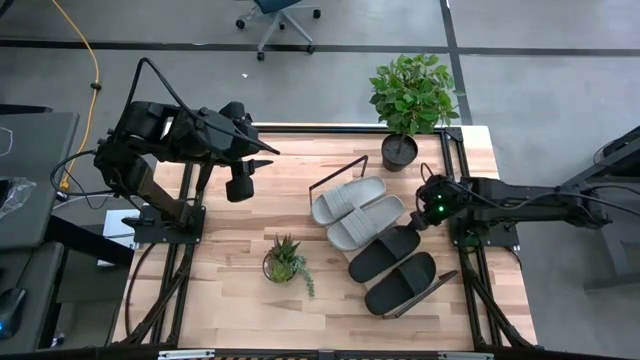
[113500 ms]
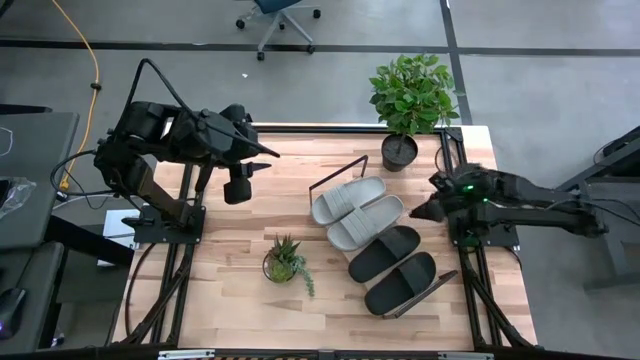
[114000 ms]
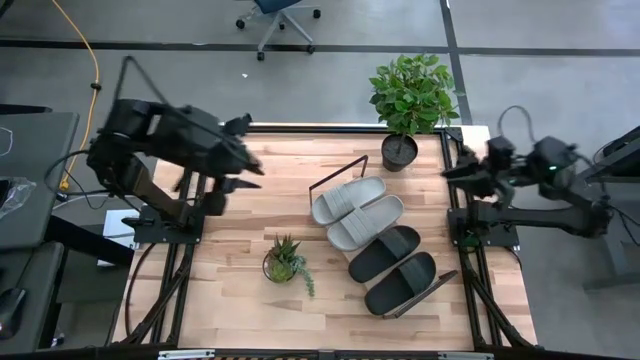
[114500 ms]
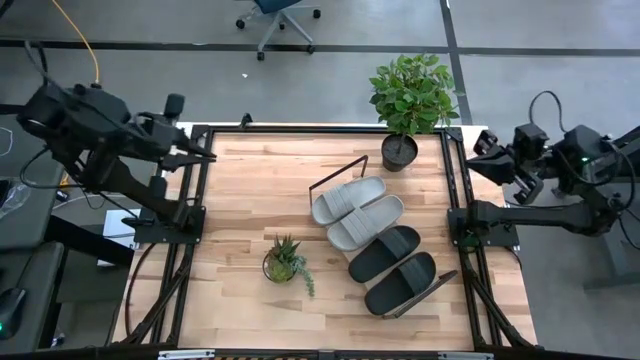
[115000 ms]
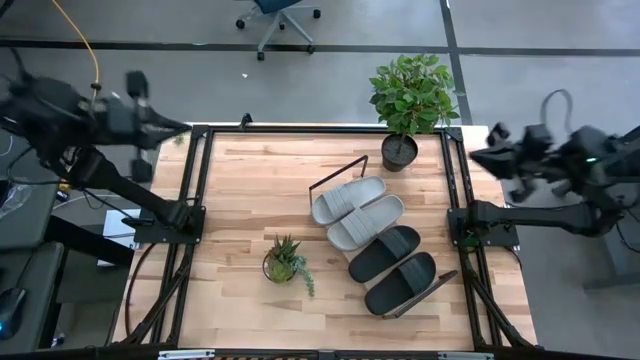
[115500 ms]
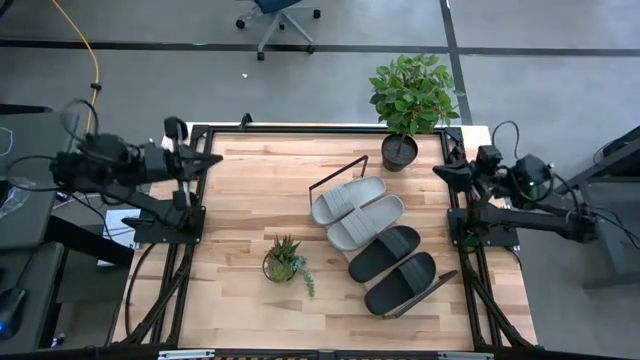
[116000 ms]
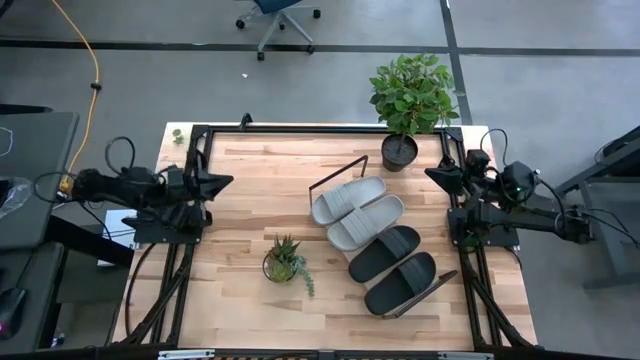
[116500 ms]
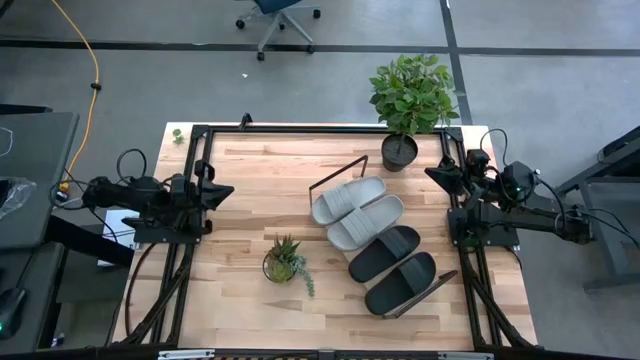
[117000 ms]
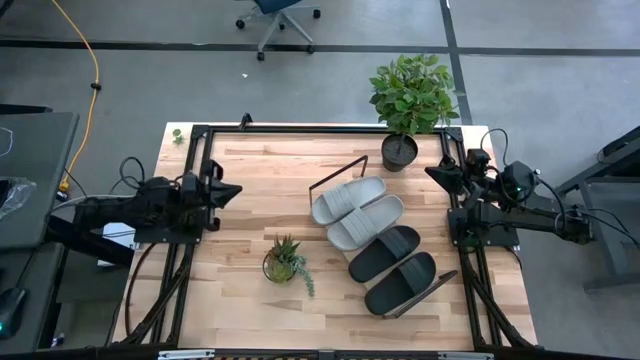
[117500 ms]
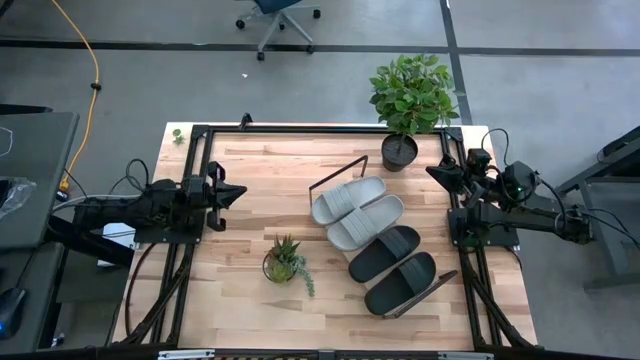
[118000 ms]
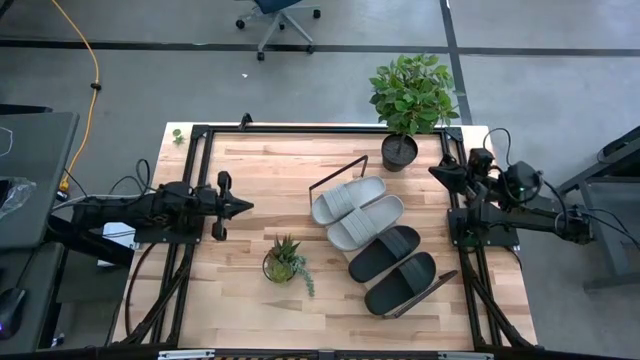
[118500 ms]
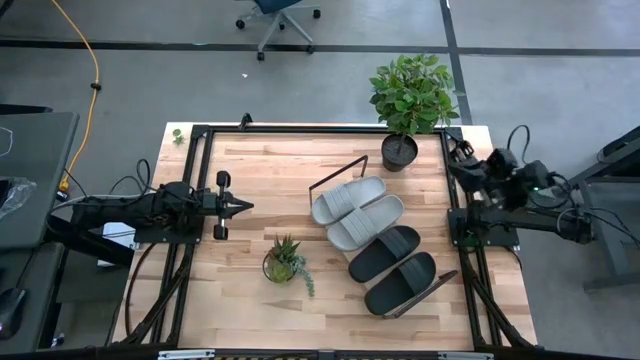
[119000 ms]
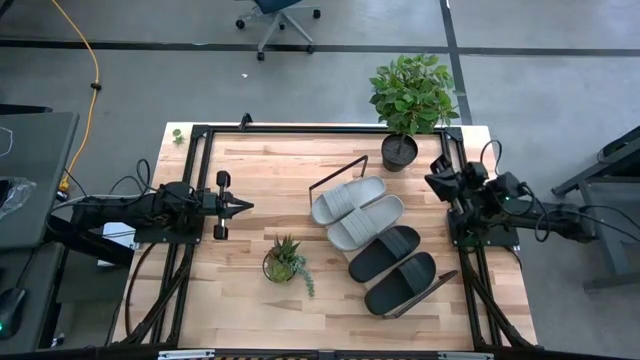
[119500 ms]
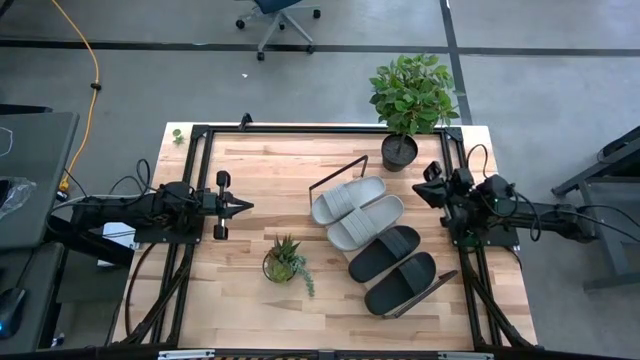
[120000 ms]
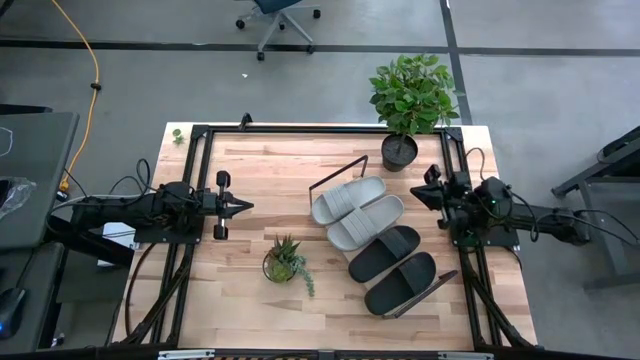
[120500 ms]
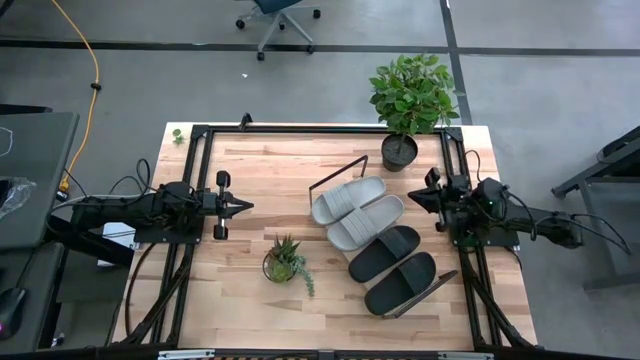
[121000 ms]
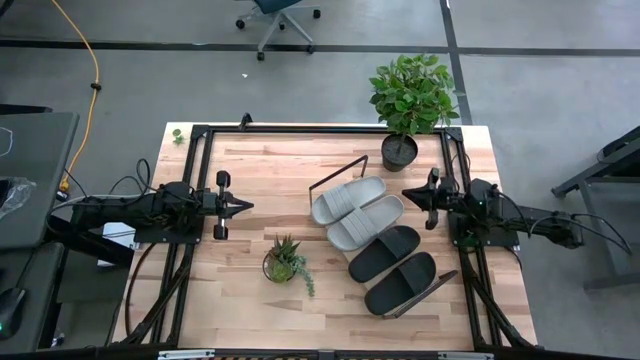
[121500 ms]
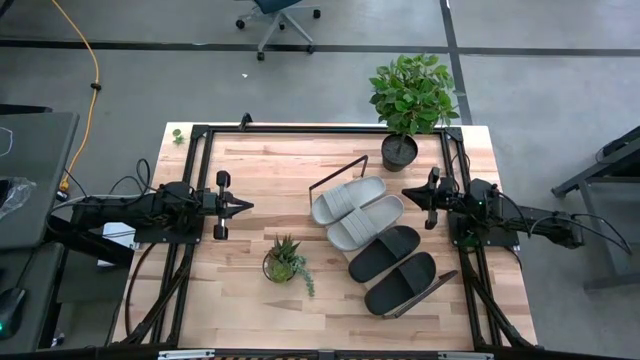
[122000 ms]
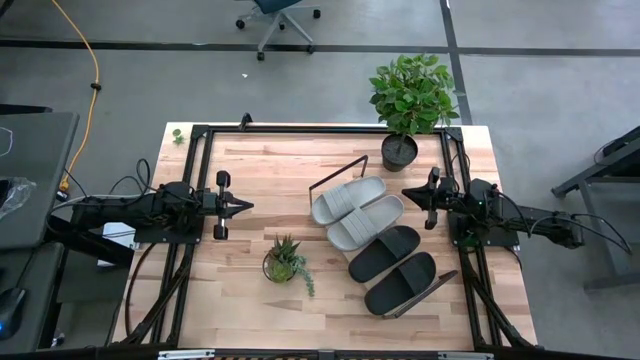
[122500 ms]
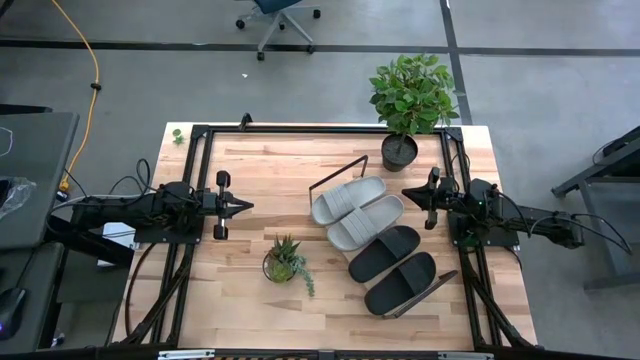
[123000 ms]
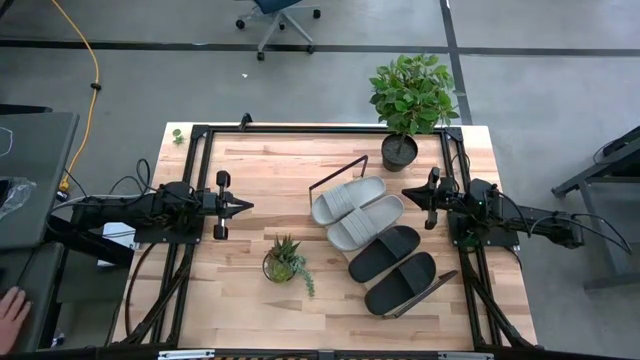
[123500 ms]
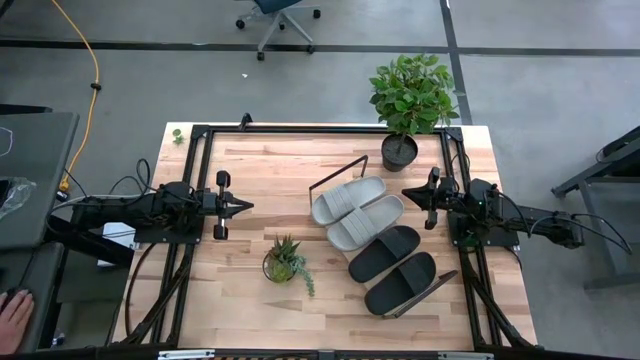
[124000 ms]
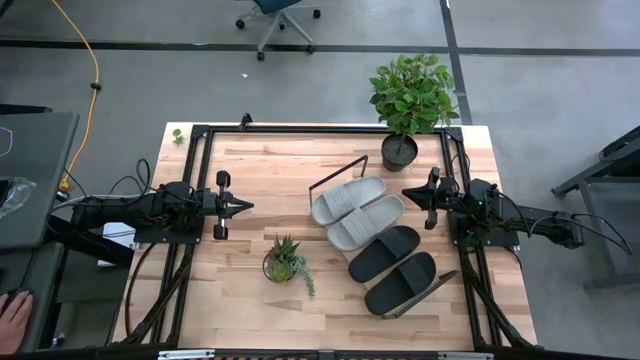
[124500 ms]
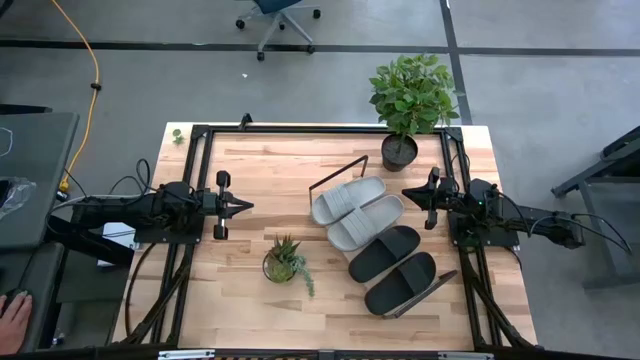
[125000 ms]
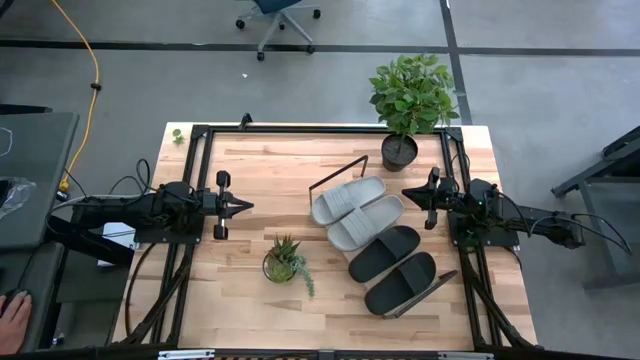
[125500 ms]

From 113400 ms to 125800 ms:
Task: Pick and place slides into the shelf
Return to Home Position

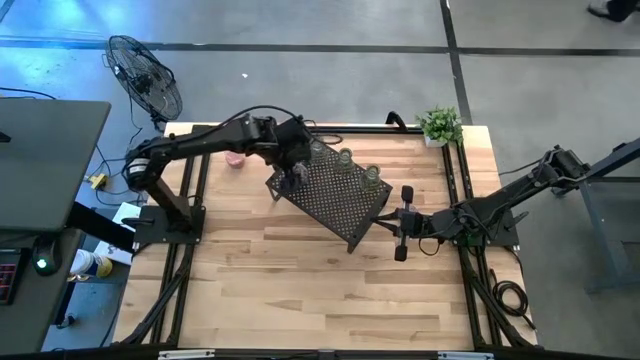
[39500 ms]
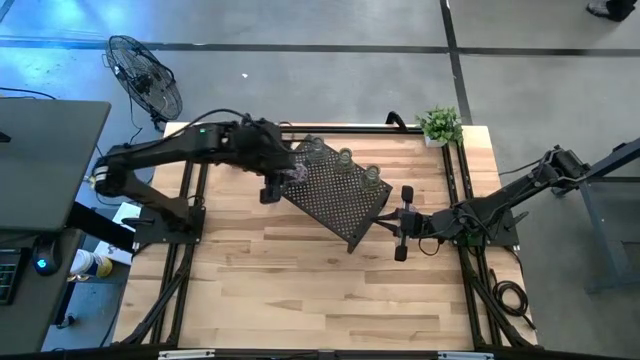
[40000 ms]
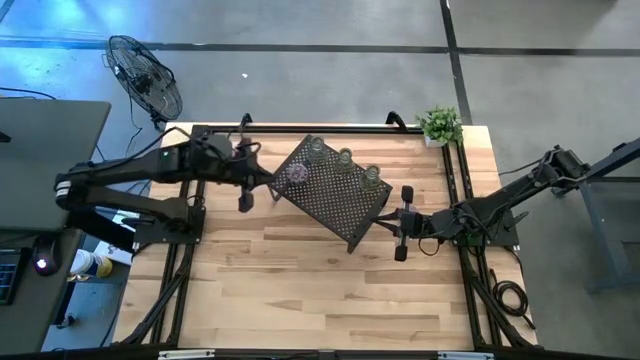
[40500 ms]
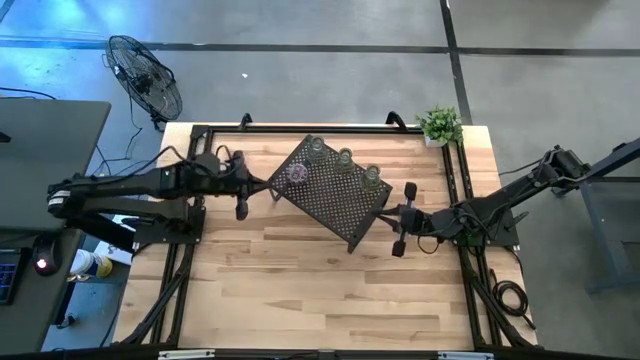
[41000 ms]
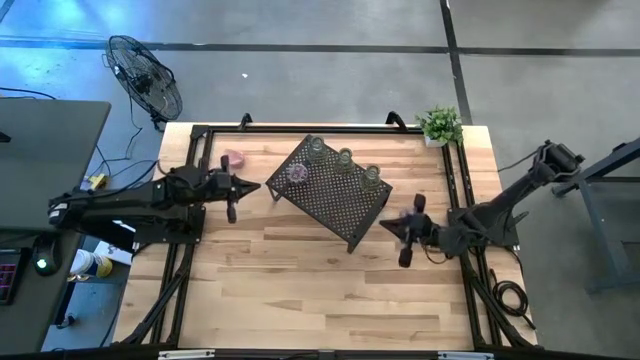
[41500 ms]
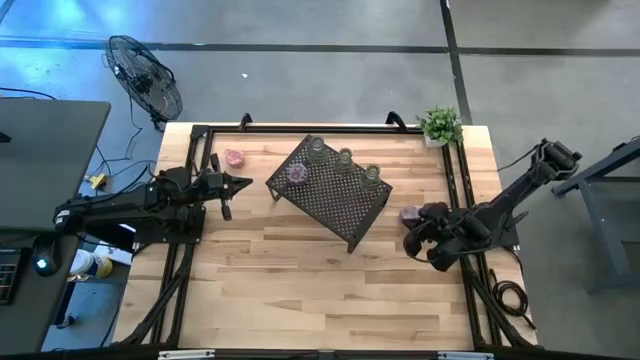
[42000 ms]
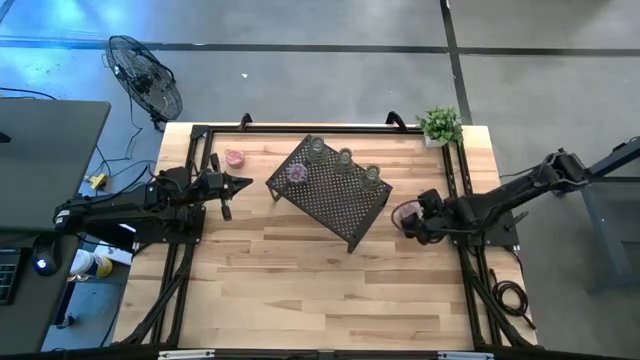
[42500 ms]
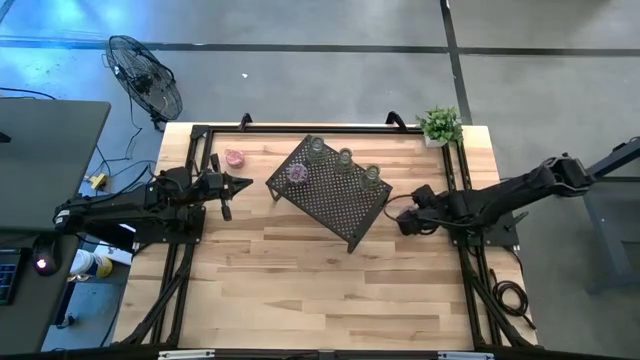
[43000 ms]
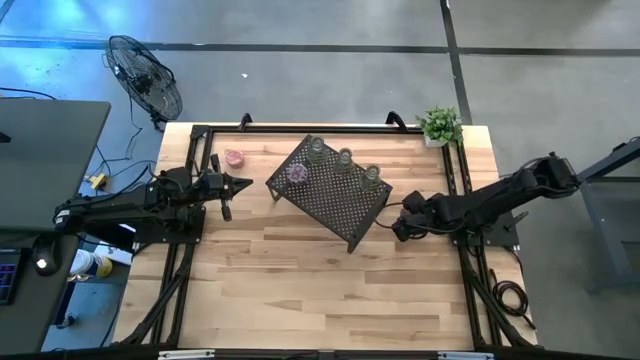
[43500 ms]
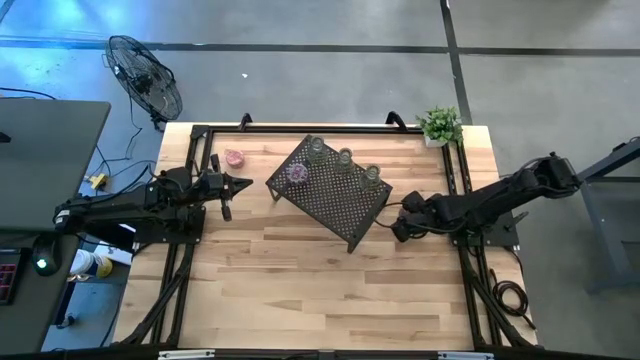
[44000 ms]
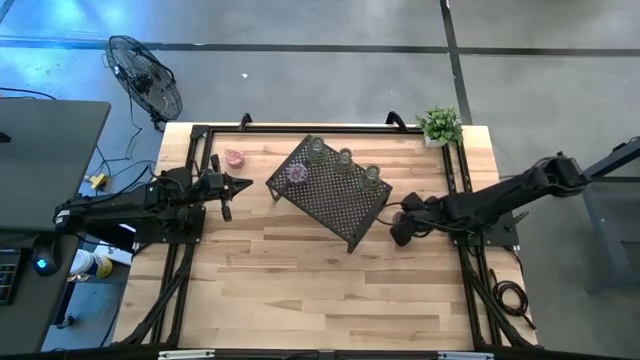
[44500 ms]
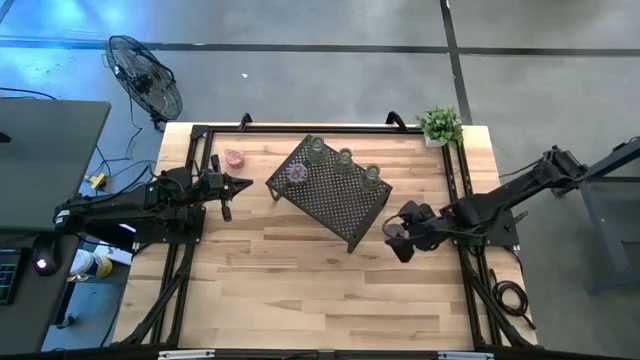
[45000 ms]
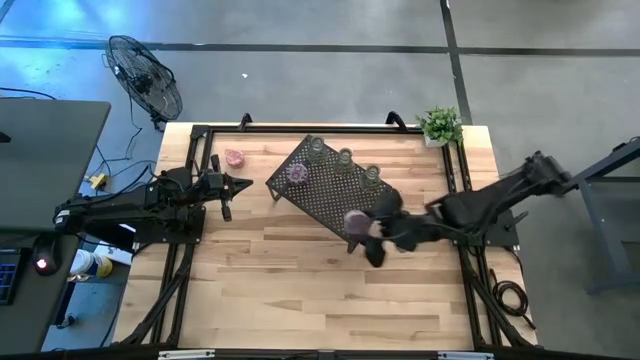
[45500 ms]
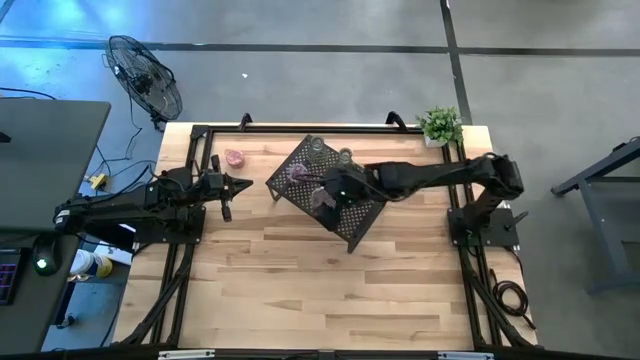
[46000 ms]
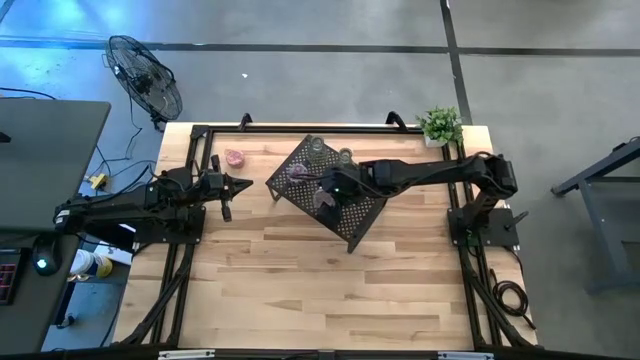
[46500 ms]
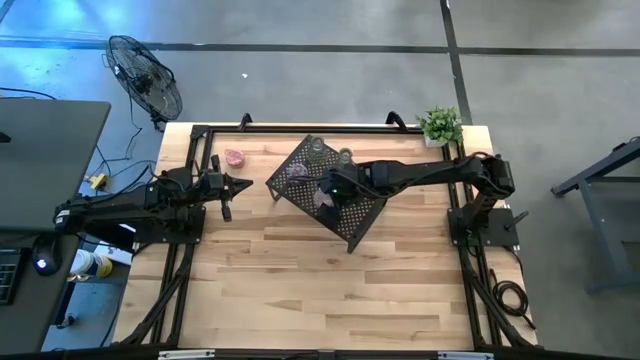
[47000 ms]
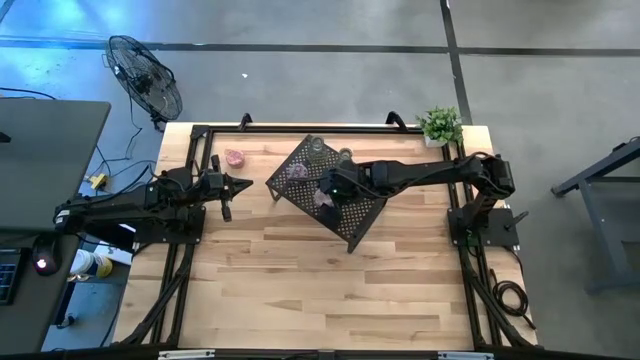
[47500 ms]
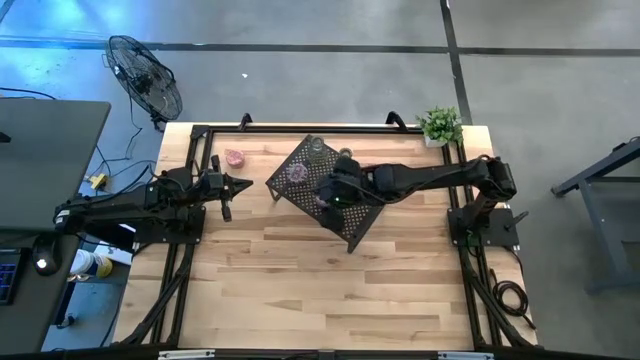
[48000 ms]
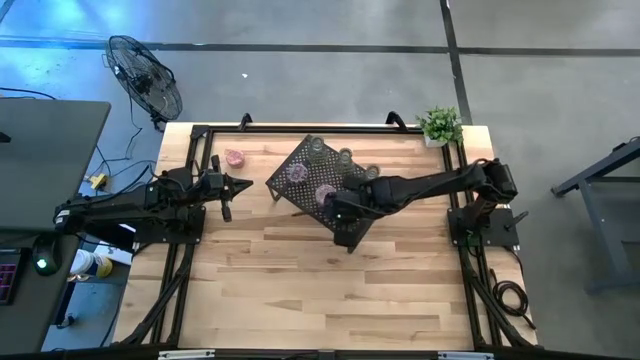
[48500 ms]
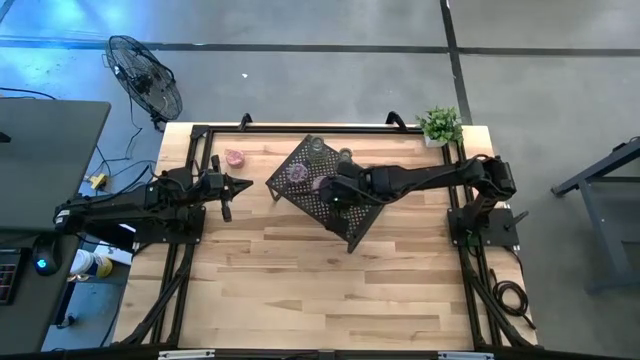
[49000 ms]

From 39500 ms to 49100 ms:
Task: Pick & Place candle stick holders
Put the red scented candle on the shelf
